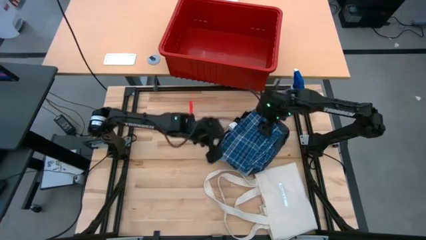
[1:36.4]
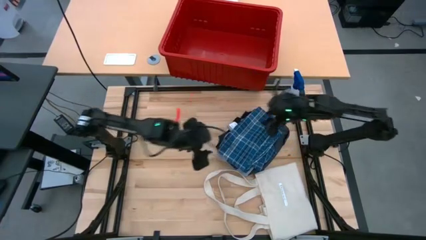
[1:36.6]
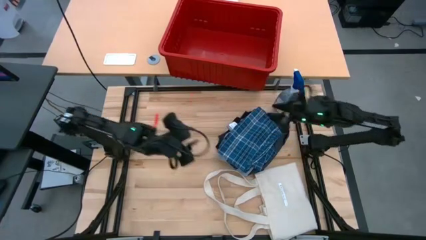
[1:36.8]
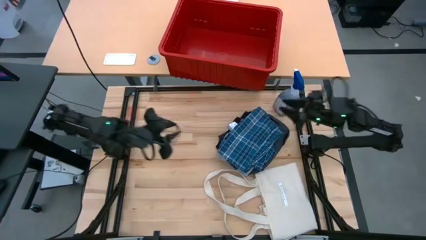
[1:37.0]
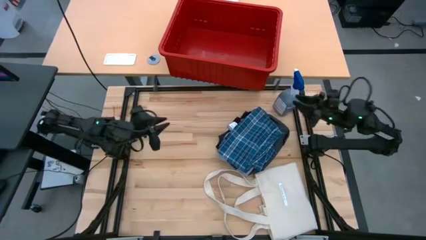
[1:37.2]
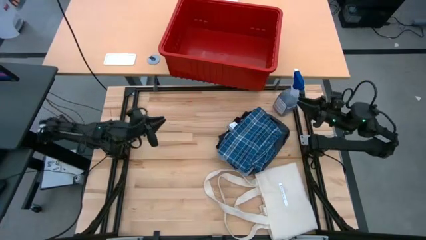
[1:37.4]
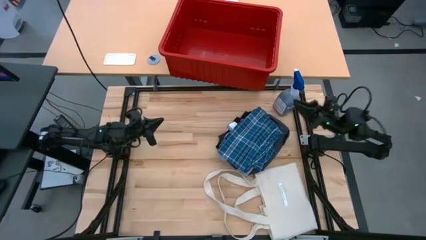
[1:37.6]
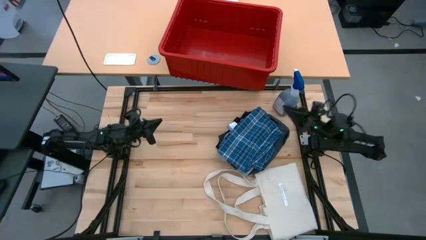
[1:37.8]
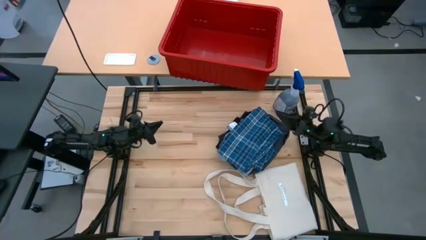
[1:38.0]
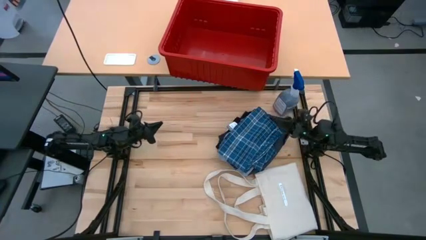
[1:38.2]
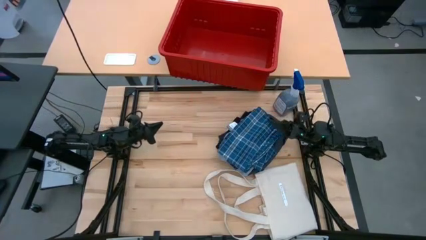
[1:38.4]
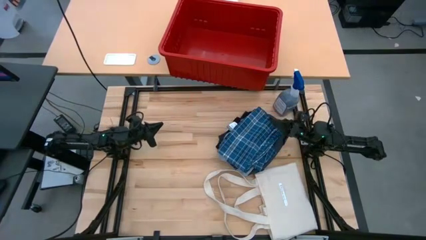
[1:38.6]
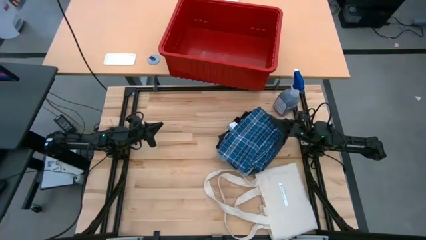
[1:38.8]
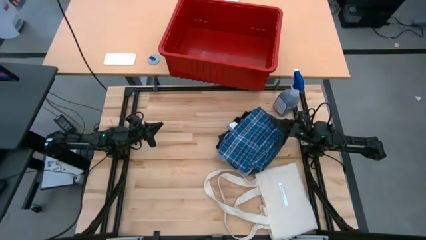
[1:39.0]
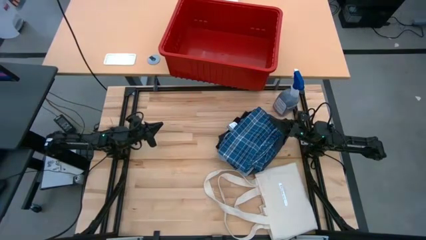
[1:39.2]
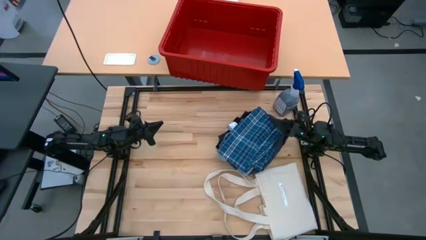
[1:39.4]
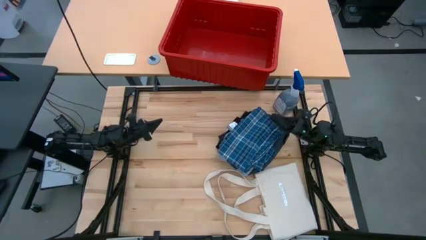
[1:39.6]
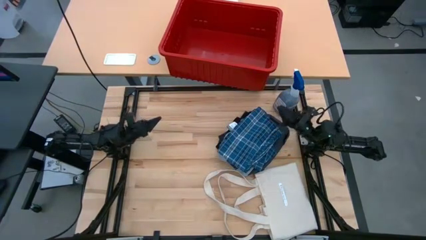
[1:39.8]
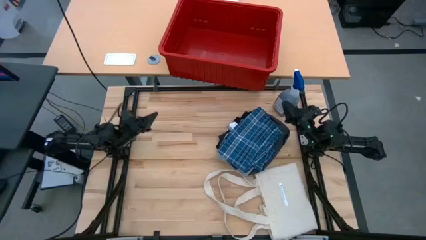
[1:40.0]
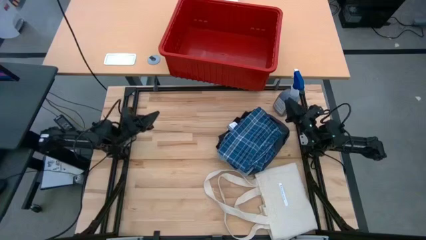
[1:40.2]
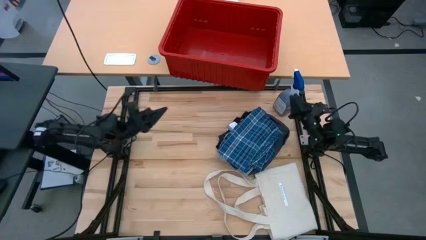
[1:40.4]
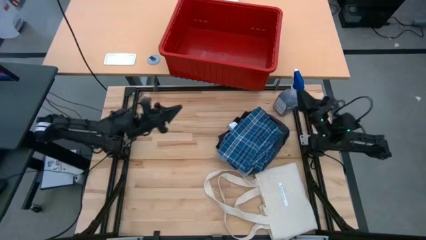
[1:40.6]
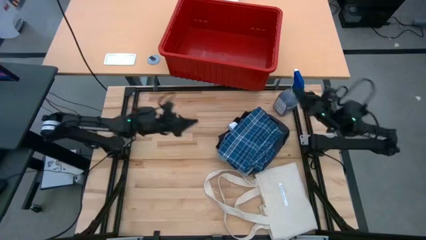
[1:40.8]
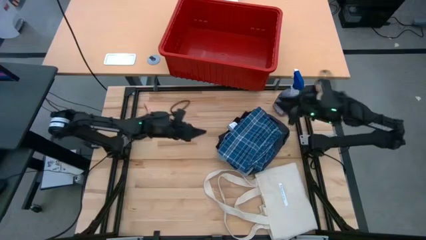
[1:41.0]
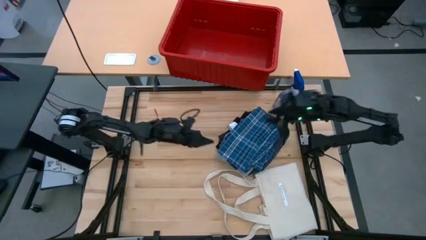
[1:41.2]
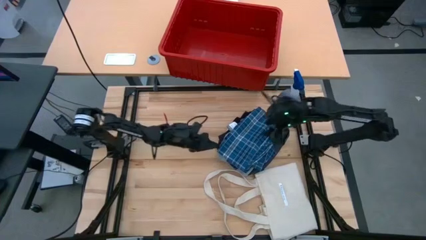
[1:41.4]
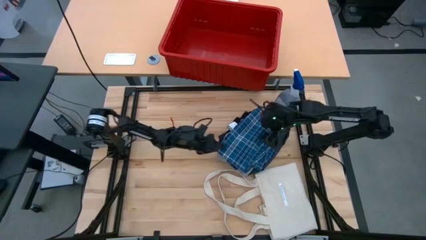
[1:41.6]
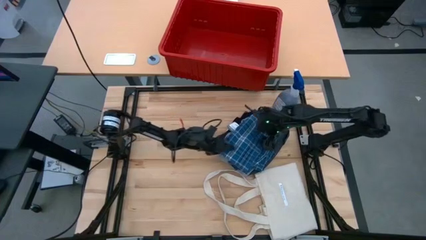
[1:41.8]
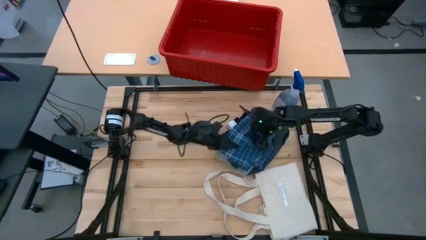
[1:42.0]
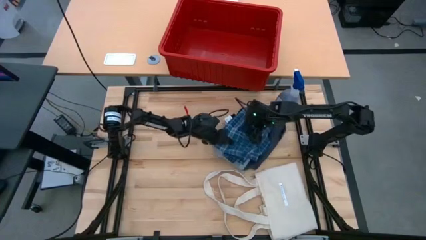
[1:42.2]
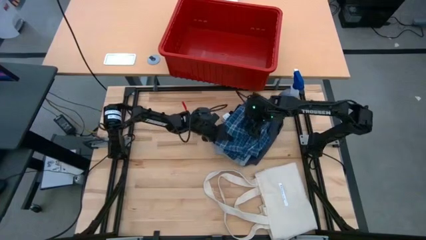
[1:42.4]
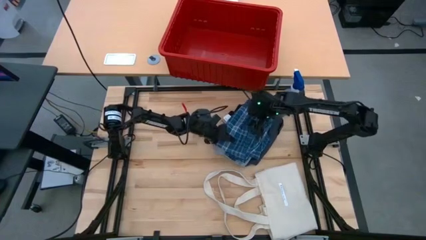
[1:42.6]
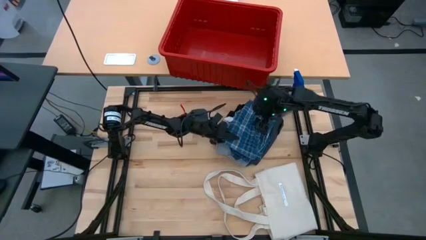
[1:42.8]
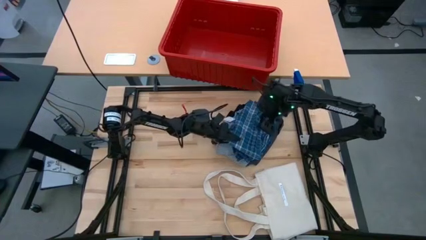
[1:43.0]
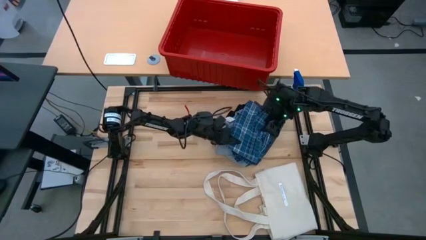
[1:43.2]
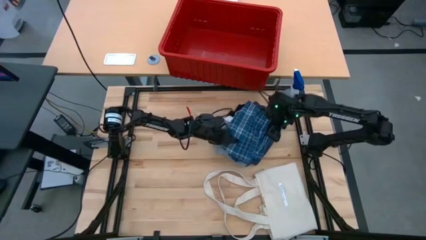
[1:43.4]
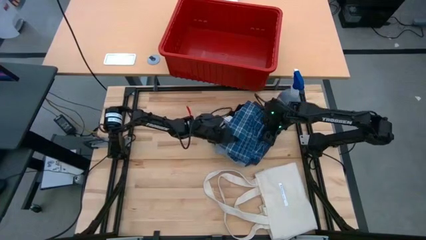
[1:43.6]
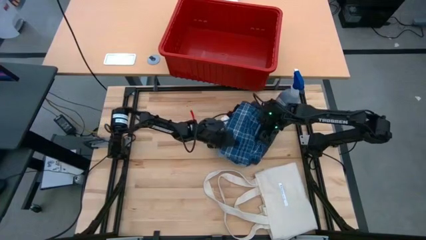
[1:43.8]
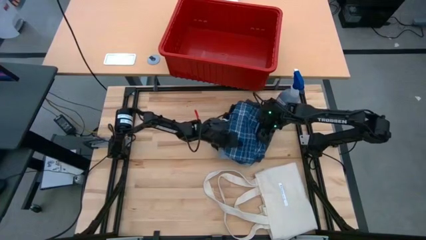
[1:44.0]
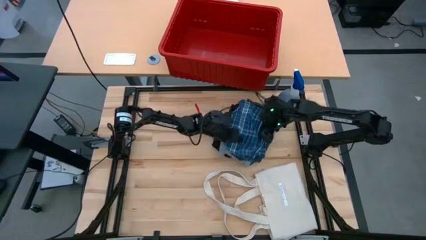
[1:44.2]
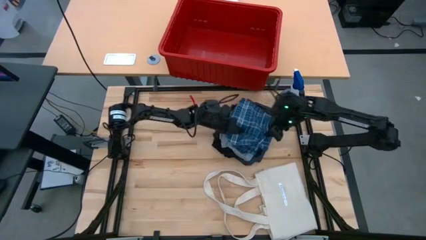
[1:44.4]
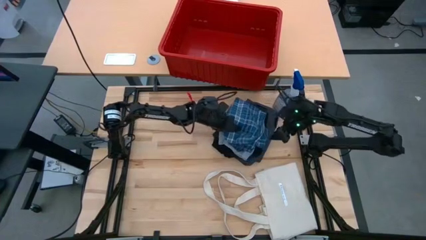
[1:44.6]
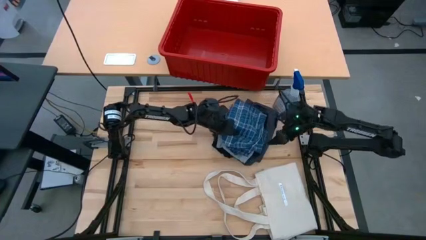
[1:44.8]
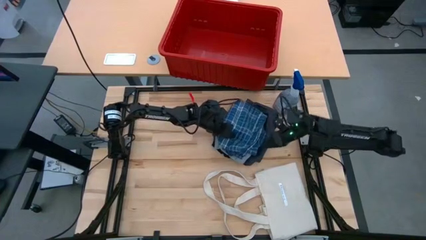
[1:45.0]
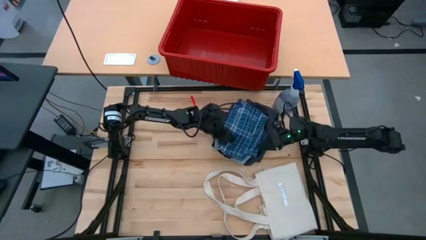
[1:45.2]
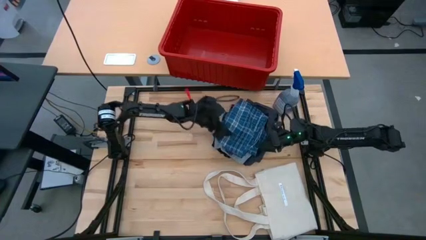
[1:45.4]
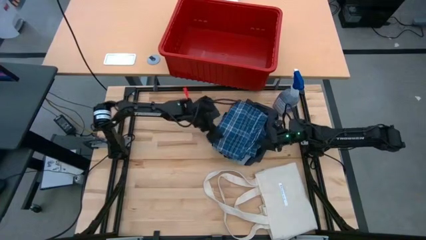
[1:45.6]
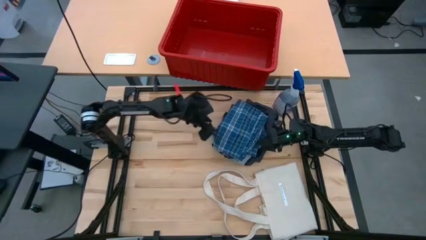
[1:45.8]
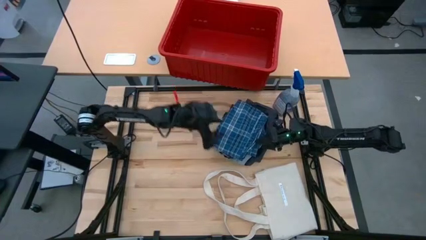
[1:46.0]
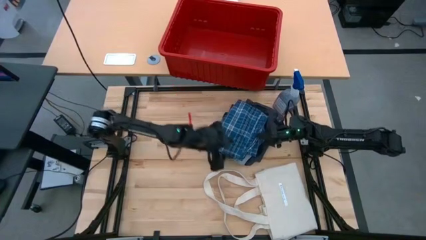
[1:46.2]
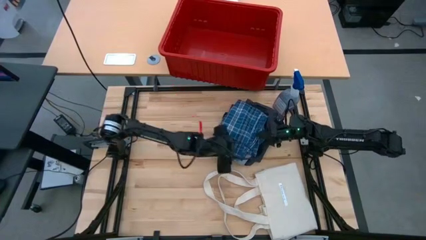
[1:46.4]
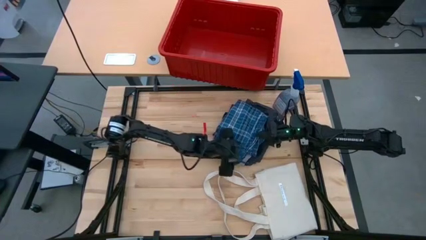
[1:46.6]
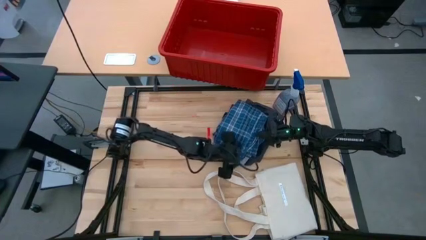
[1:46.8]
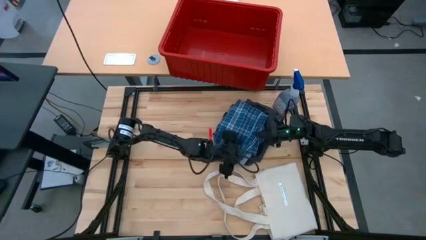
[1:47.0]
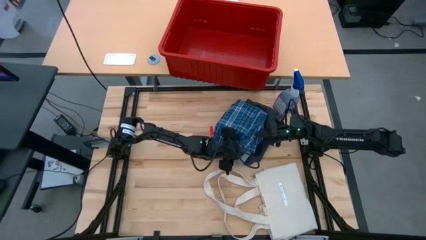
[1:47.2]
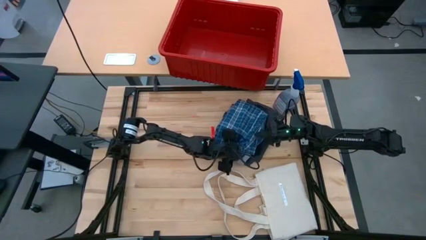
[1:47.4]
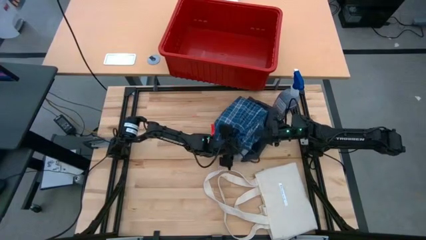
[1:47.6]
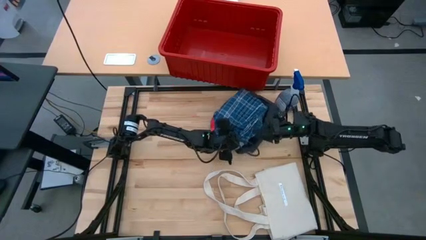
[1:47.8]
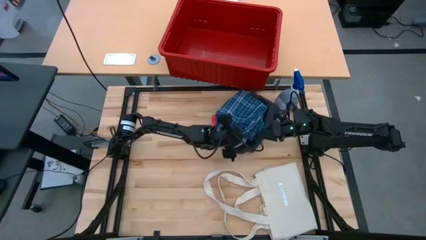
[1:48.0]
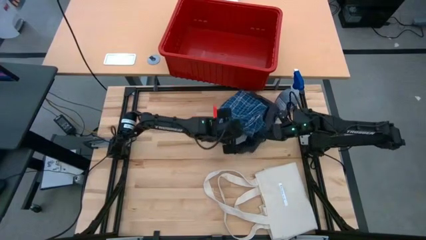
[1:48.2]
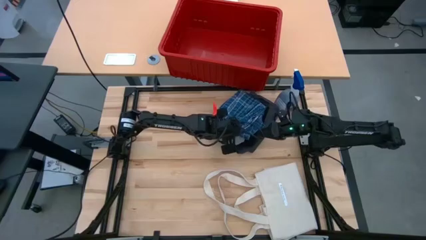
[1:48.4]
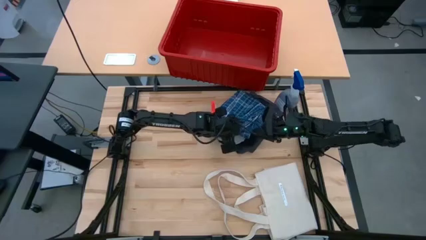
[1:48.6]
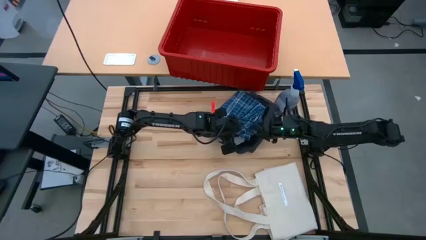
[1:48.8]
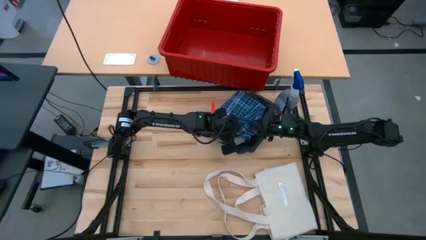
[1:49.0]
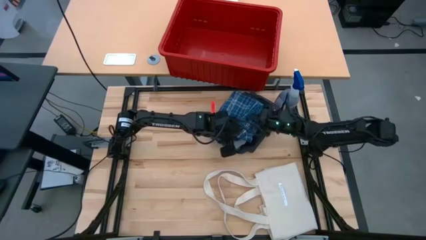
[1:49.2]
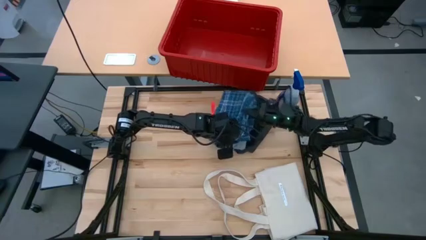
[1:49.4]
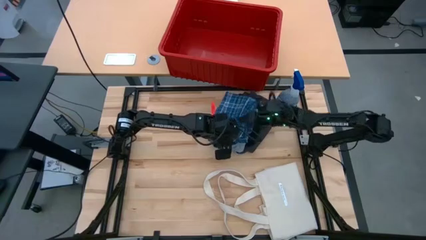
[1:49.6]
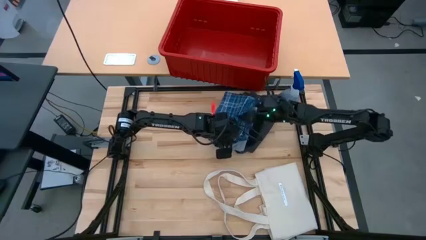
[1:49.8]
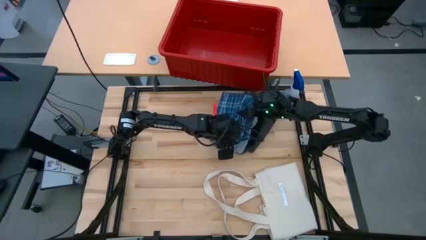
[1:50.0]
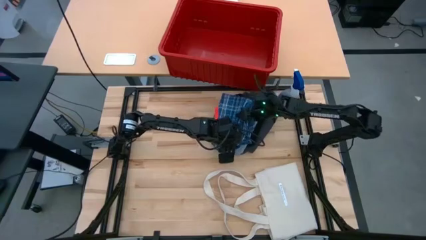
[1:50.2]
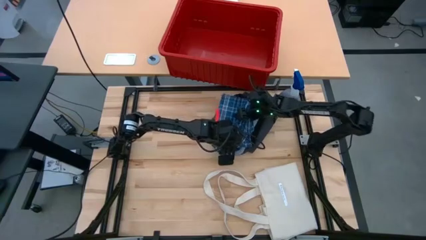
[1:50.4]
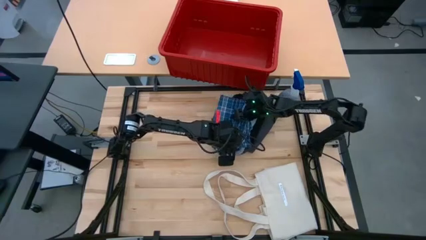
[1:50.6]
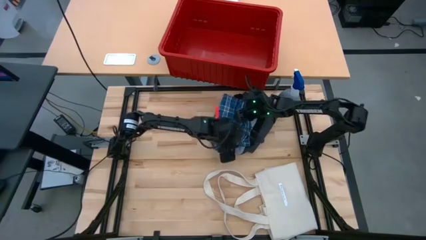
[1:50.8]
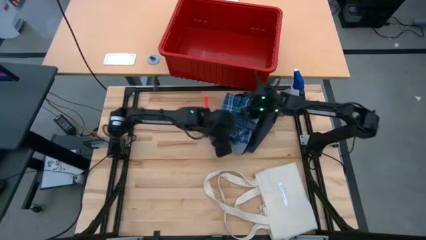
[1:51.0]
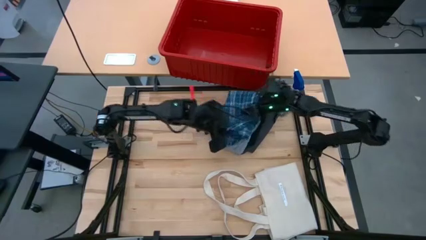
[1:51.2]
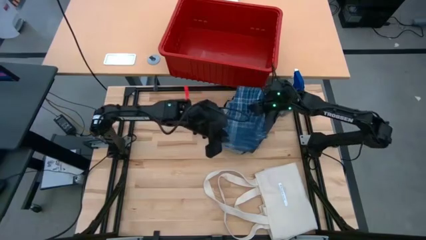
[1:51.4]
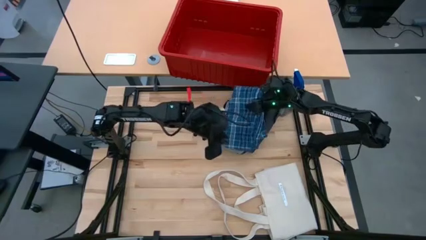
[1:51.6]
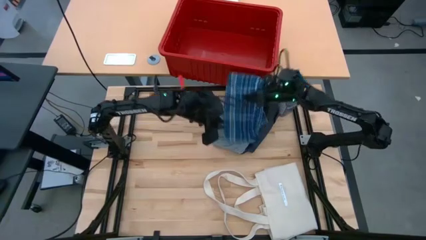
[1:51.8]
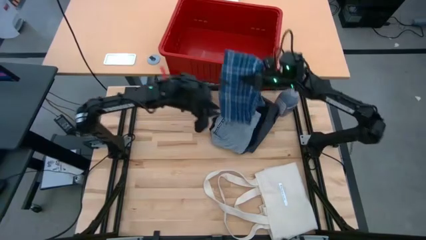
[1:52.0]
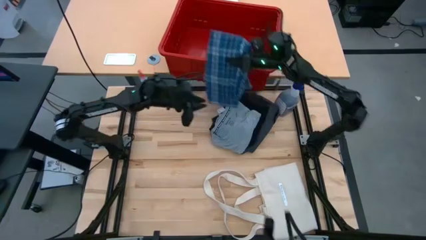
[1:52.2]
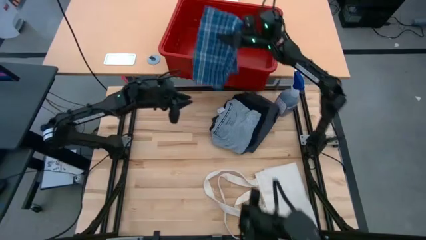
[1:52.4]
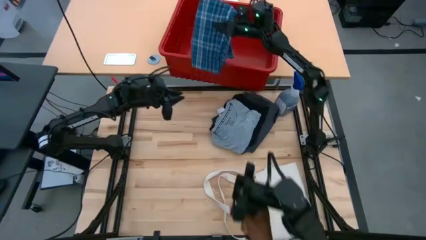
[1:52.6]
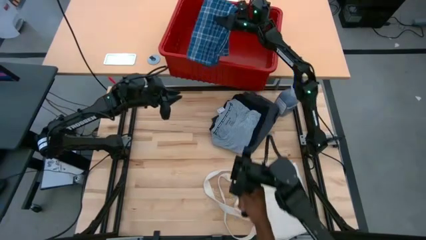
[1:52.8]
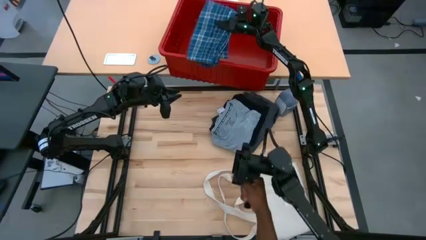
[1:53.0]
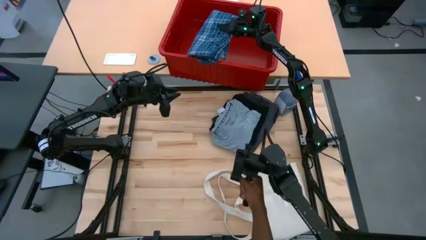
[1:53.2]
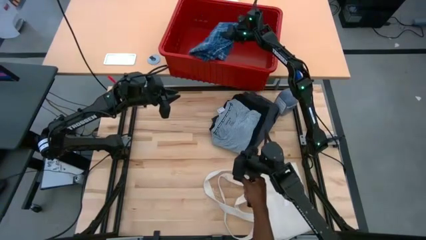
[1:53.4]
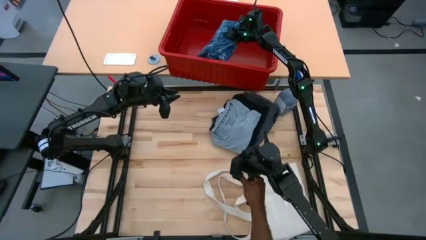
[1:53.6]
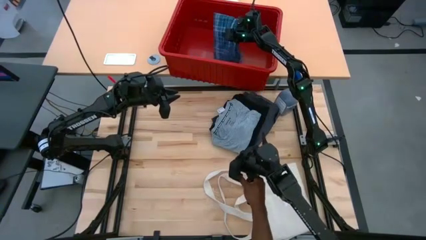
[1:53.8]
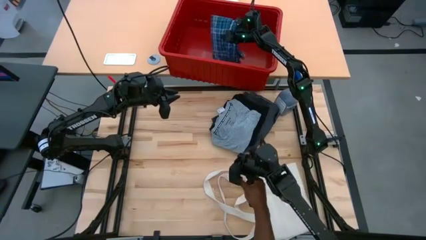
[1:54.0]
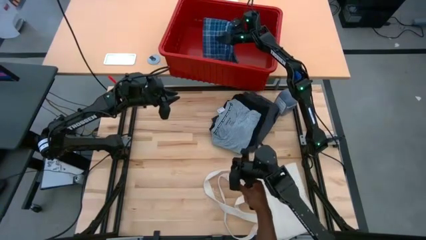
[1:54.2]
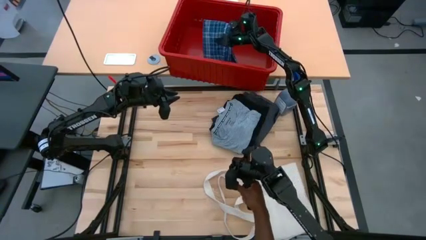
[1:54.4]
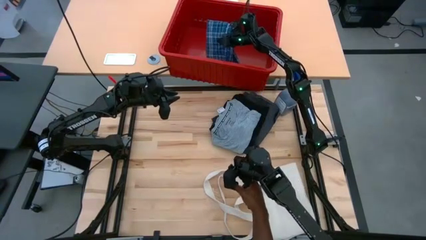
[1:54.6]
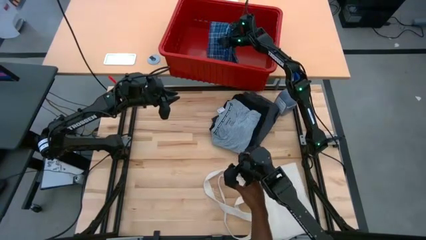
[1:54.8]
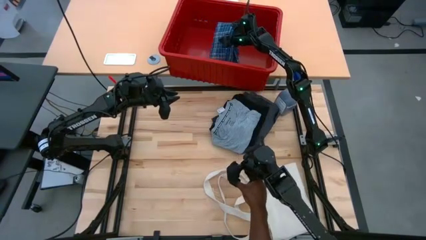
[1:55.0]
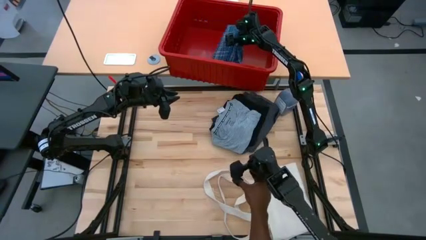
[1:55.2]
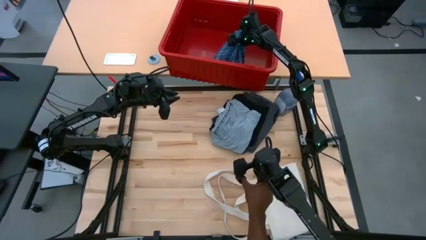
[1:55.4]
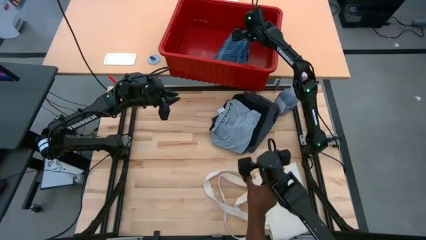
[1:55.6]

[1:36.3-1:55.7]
Task: Fold laundry
Put the blue polo shirt into the red organizer bin
